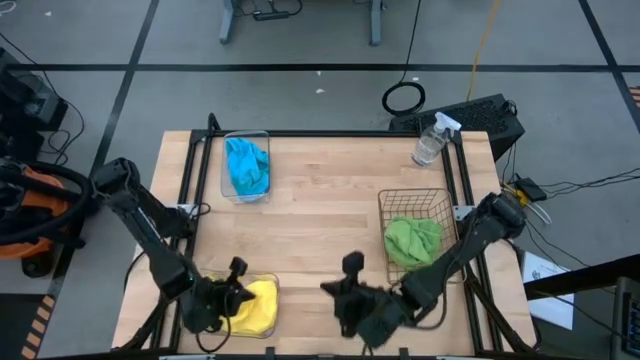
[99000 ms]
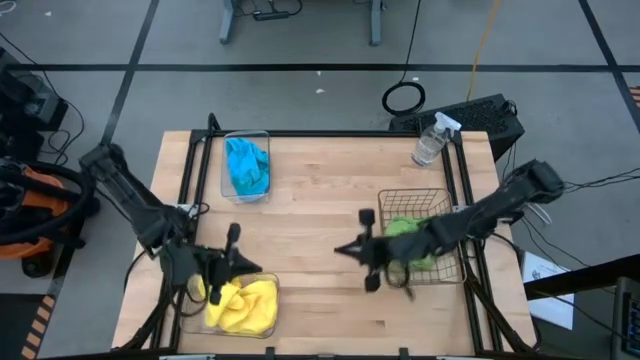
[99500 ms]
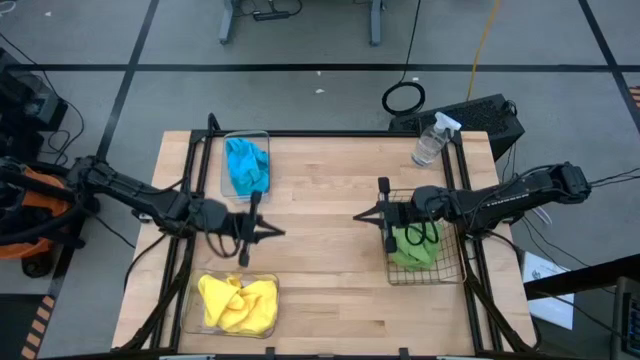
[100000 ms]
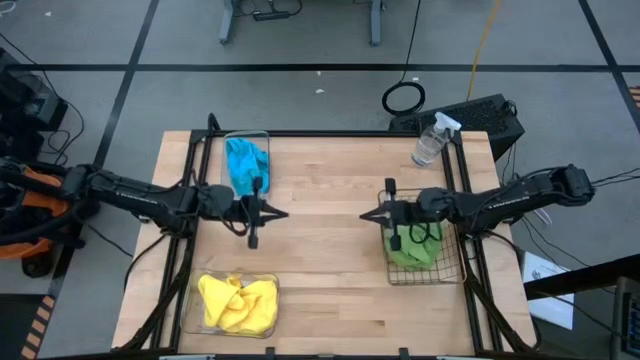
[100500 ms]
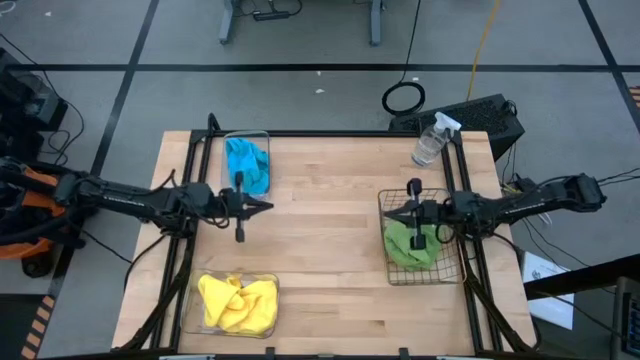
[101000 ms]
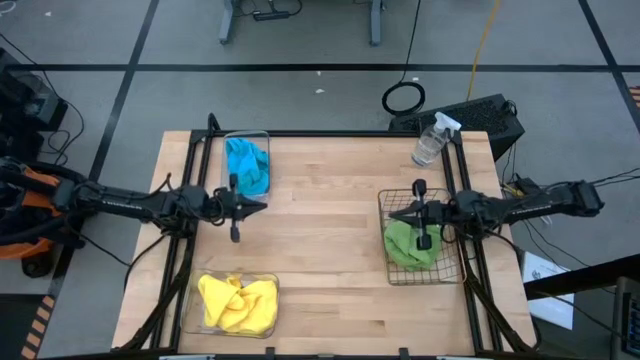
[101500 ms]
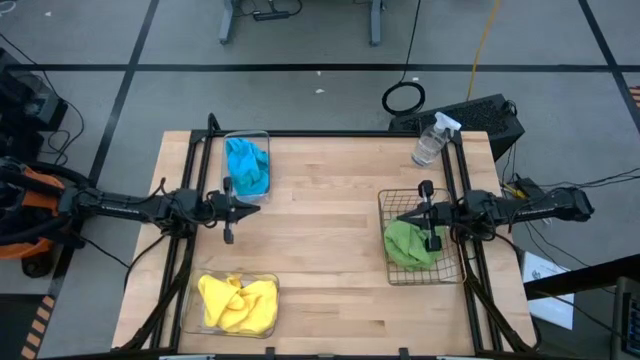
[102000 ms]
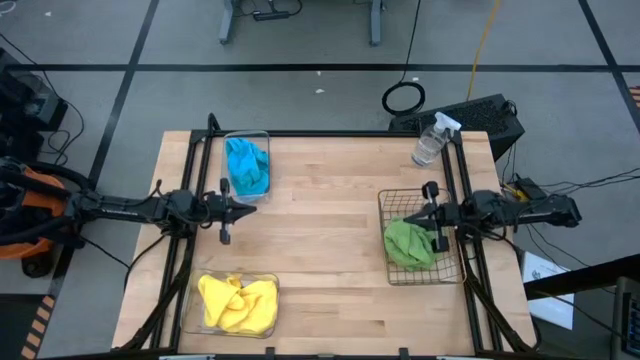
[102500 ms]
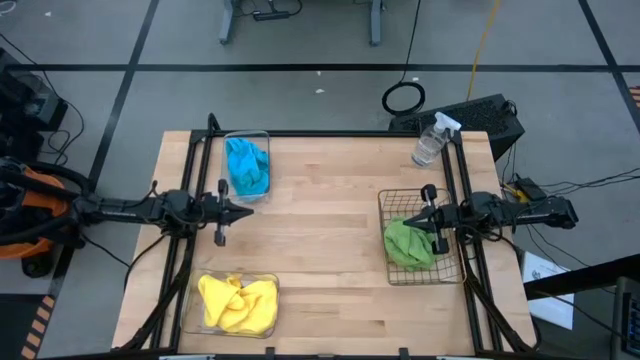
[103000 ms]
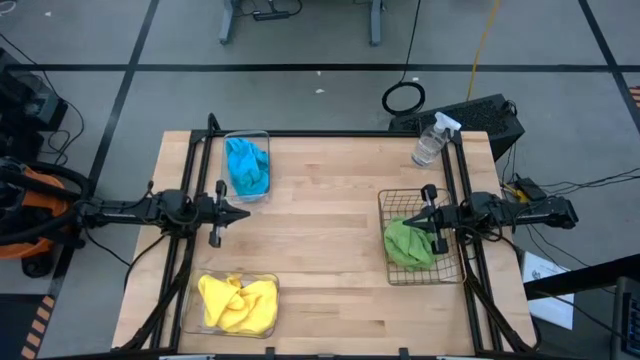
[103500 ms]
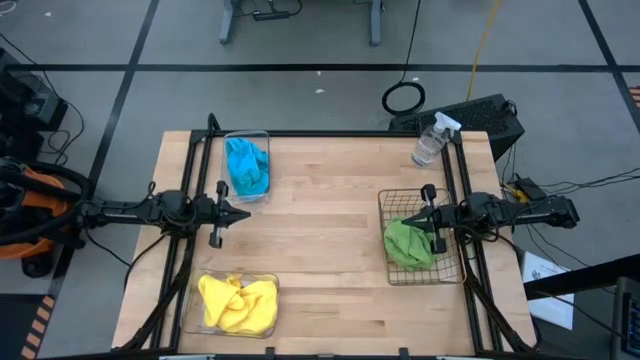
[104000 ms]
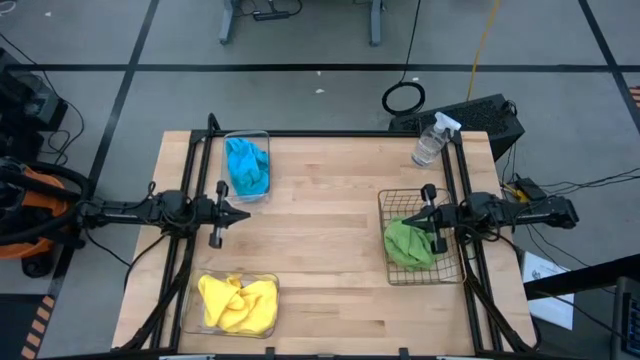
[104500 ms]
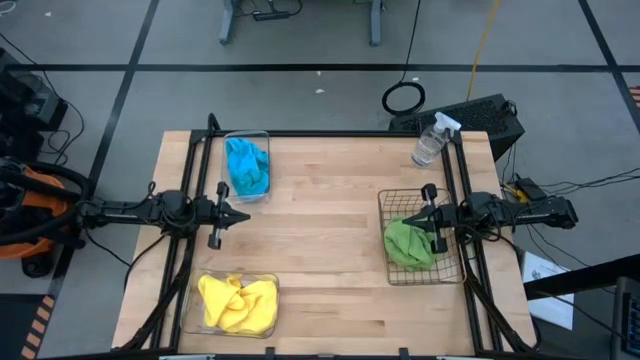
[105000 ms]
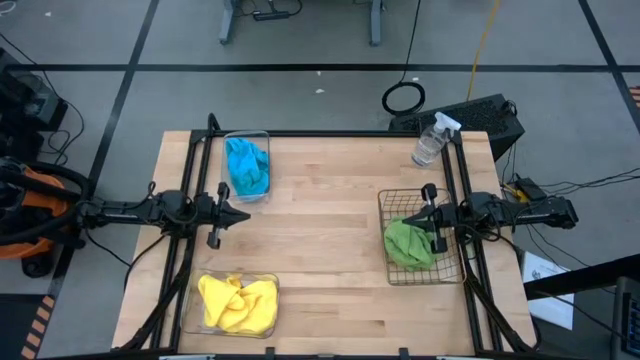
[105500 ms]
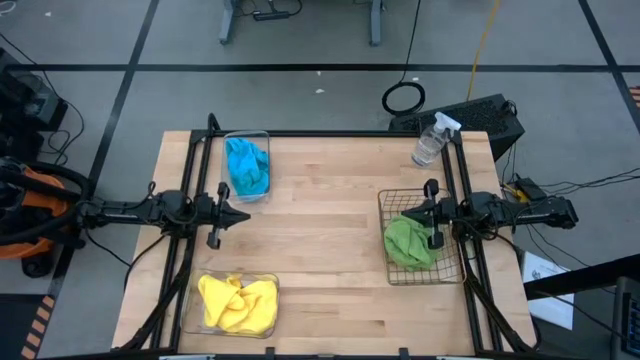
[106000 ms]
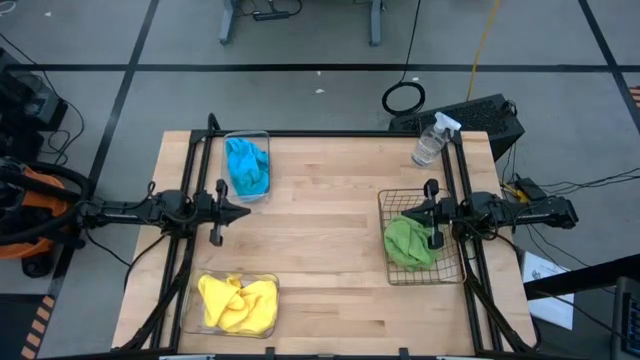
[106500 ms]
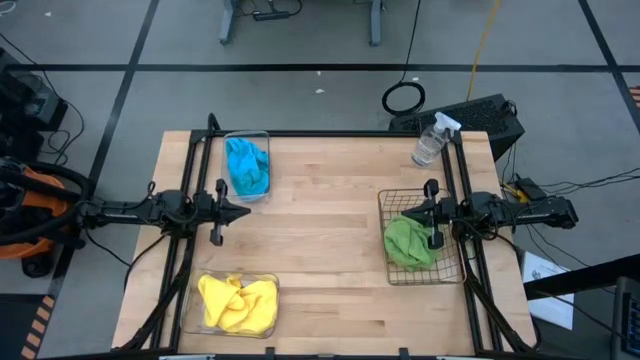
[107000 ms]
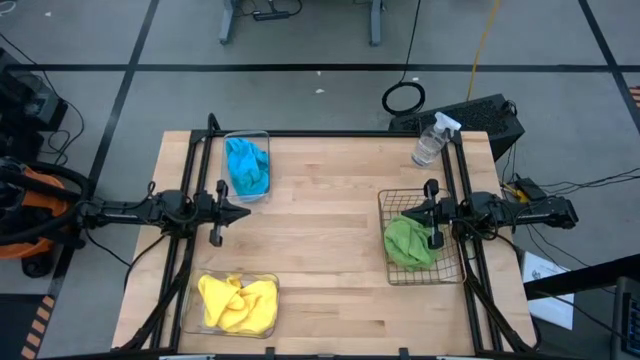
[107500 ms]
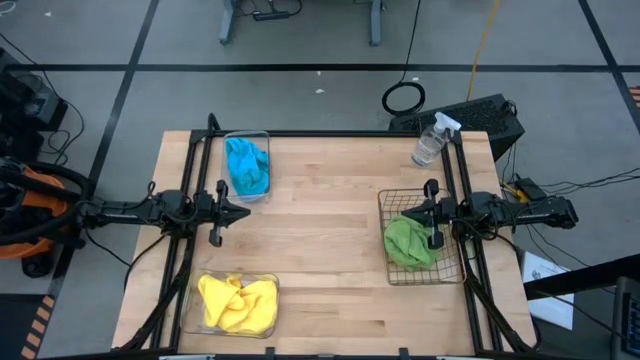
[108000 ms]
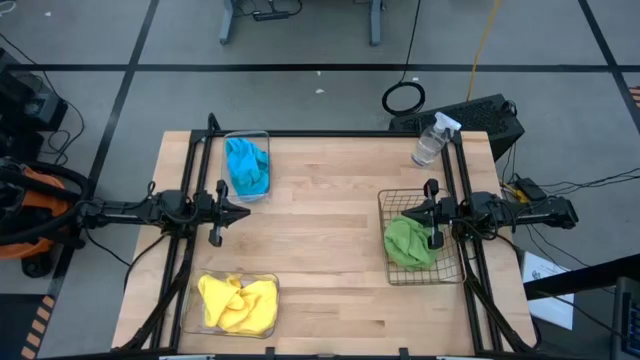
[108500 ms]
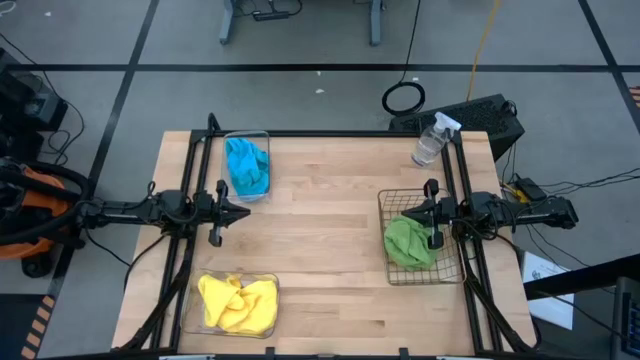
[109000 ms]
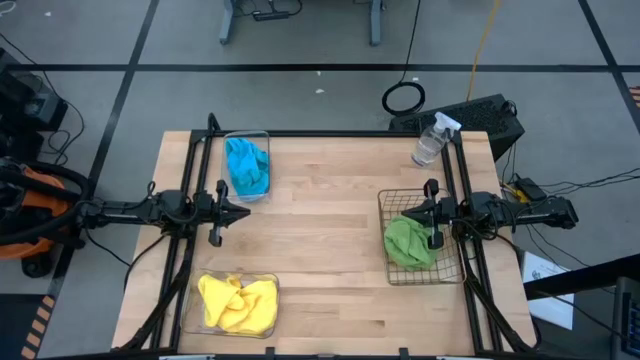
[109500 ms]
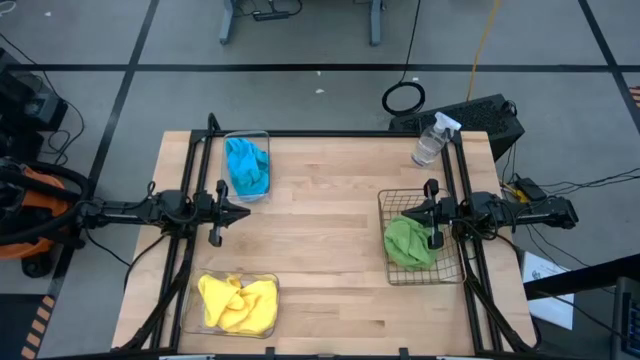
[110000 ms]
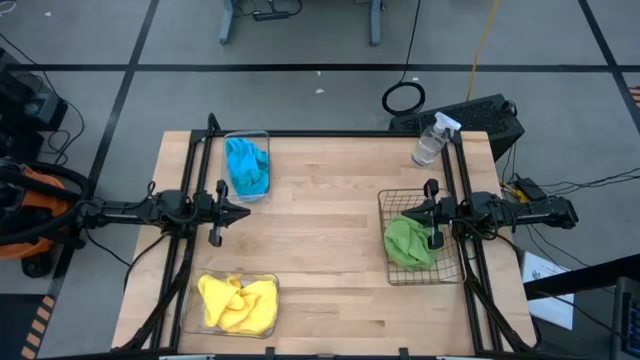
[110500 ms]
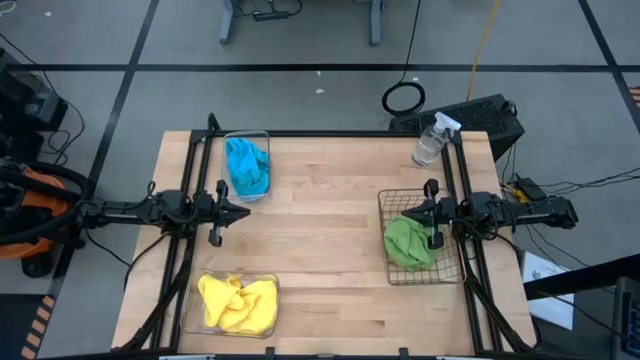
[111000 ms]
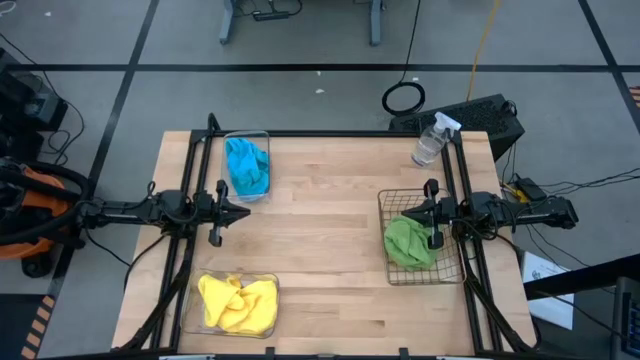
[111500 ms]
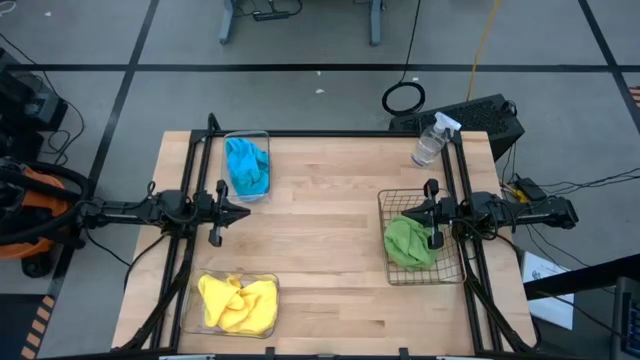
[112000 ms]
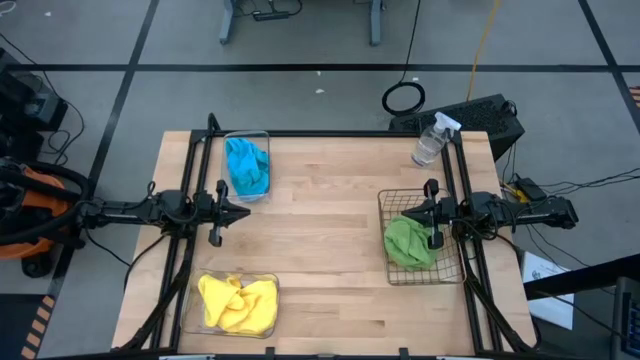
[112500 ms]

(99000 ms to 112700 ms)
Task: Sort microfiber towel by color & place in baskets
Return to Home Position

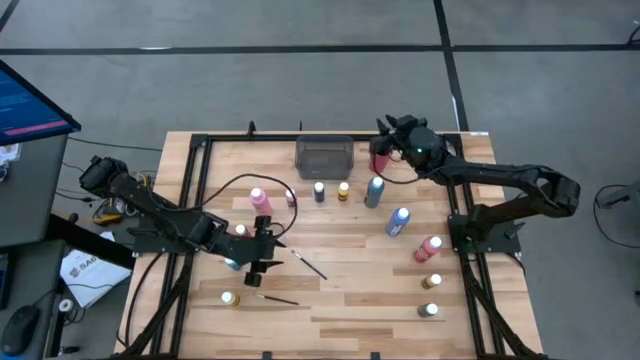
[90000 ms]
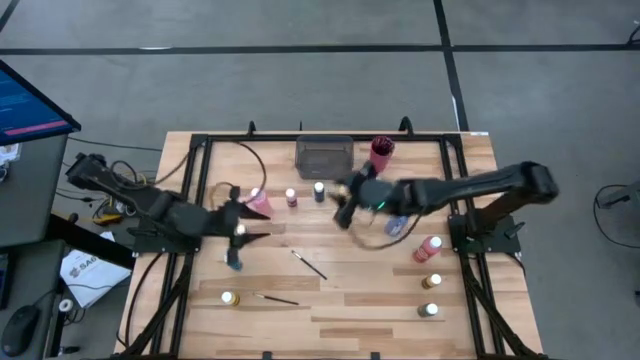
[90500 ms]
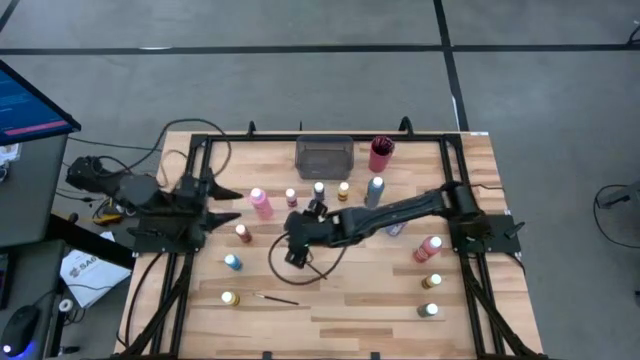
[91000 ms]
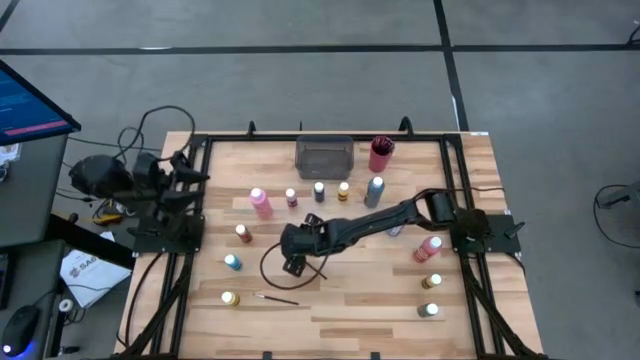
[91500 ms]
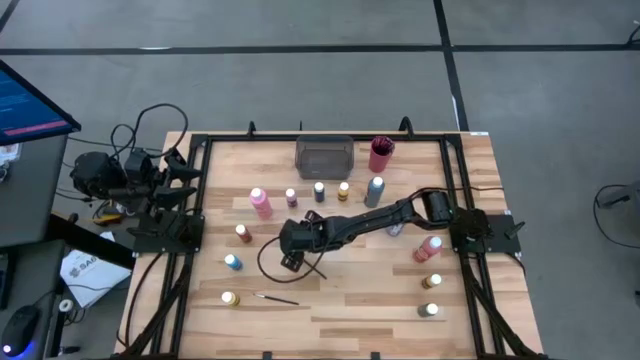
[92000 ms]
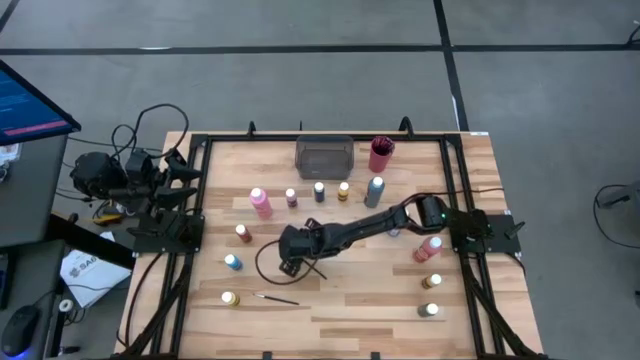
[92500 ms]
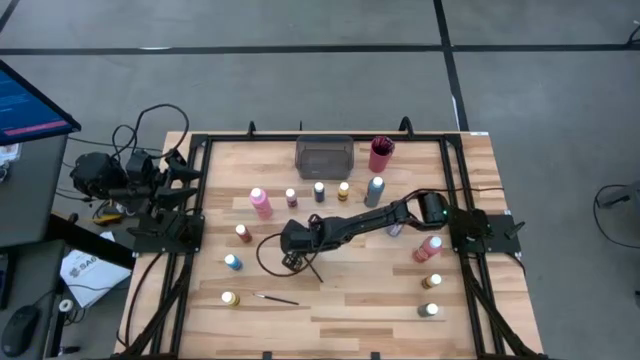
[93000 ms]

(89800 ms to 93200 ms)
Task: Pick & Place Paint Supplies
Put the black paintbrush into the red cup

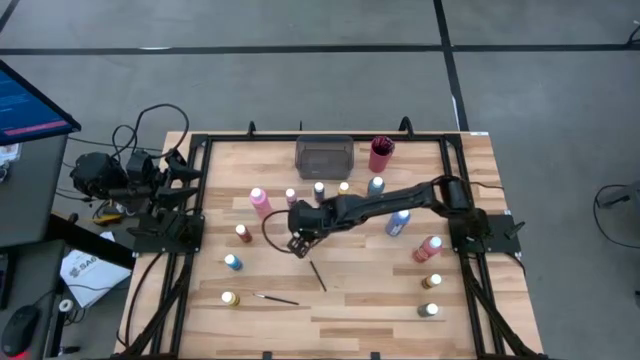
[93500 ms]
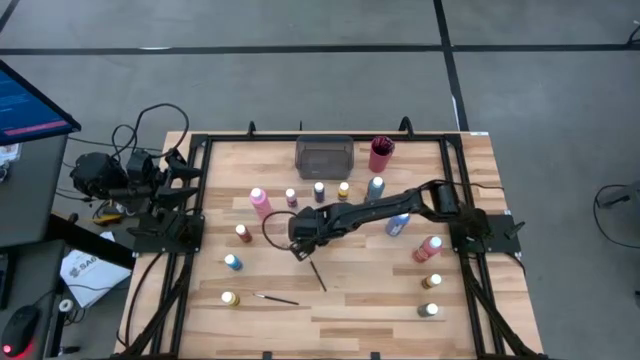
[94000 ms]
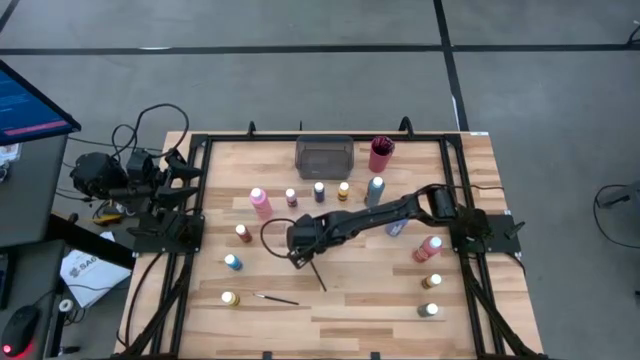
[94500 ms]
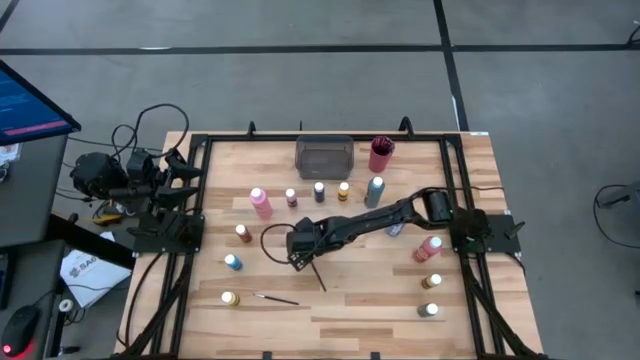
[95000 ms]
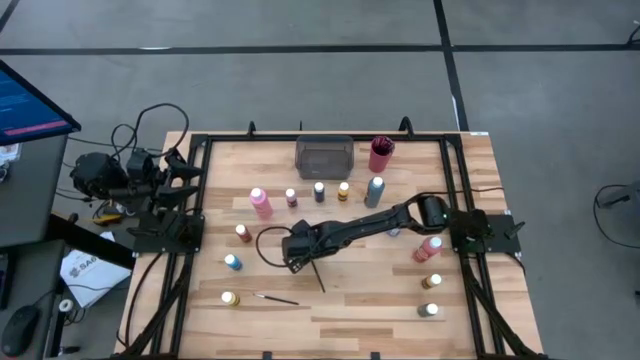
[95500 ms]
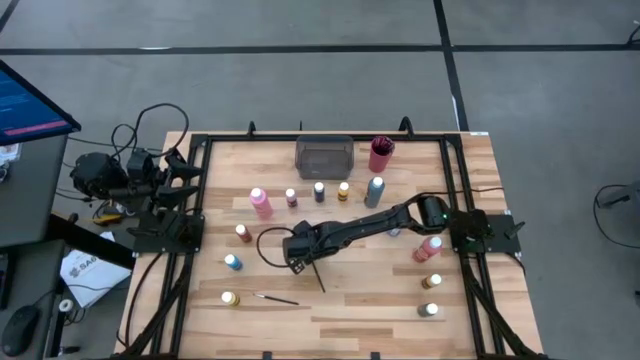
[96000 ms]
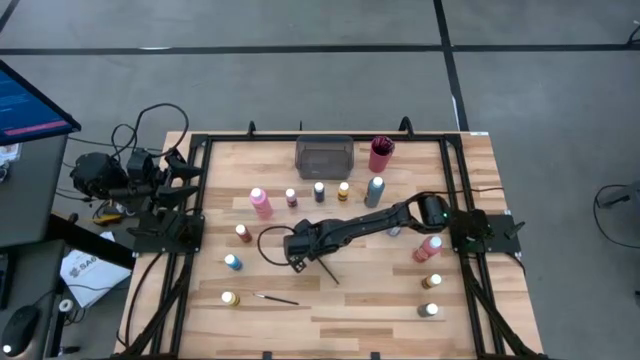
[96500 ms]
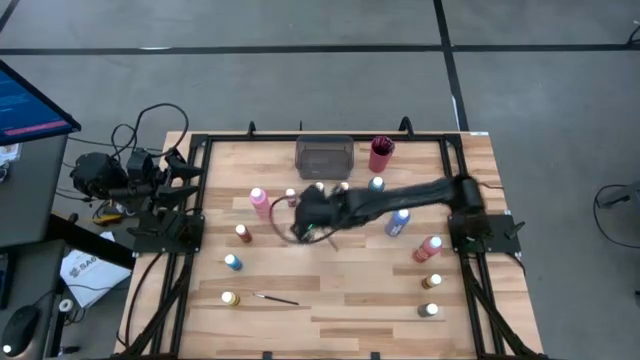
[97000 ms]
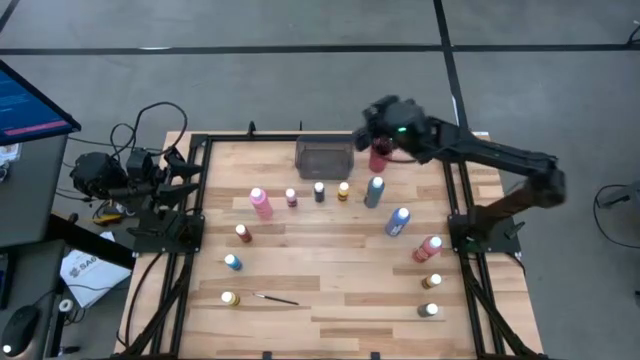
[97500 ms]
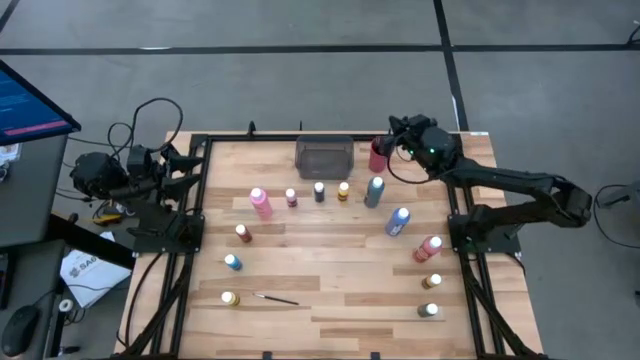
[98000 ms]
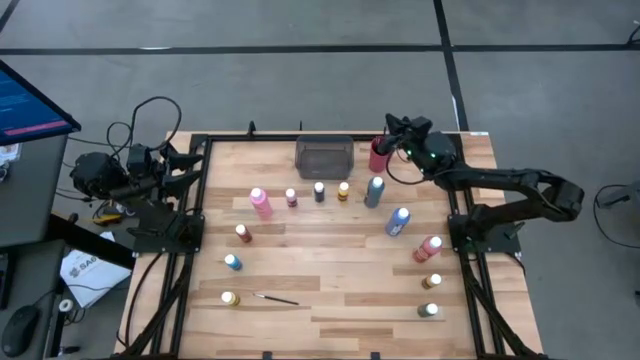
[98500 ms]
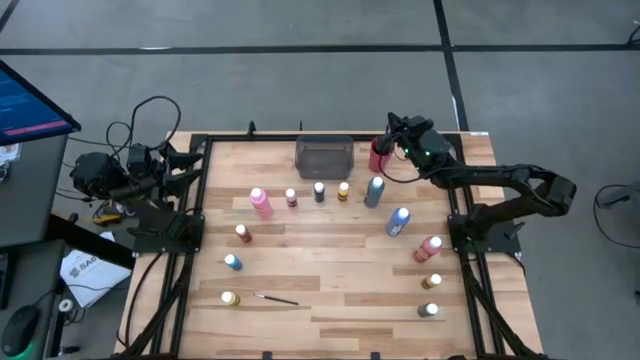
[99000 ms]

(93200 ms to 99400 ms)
Put the black paintbrush into the red cup
